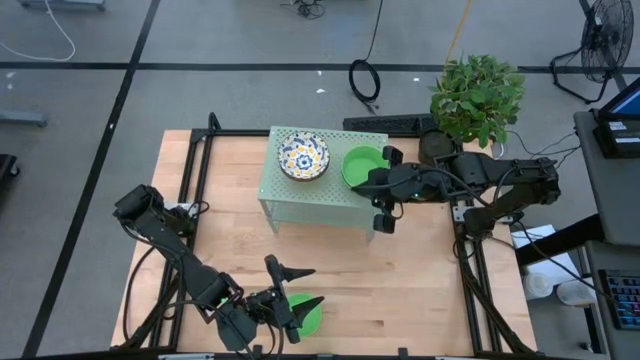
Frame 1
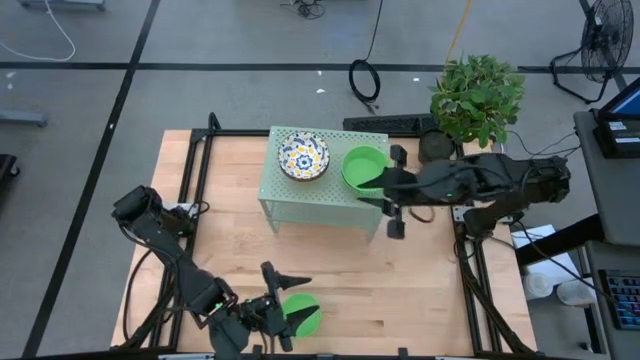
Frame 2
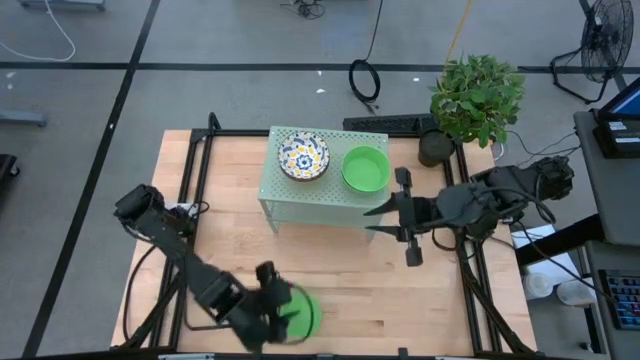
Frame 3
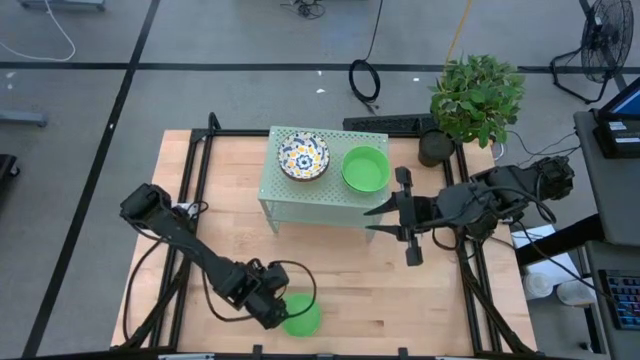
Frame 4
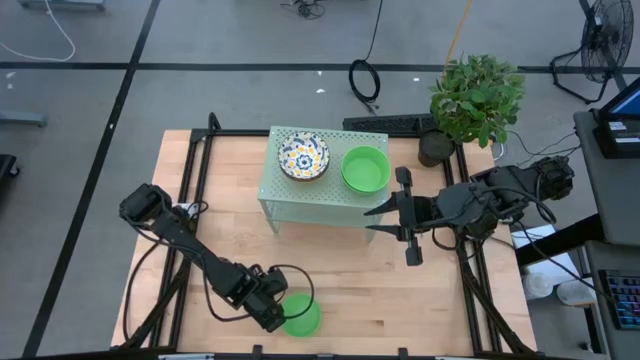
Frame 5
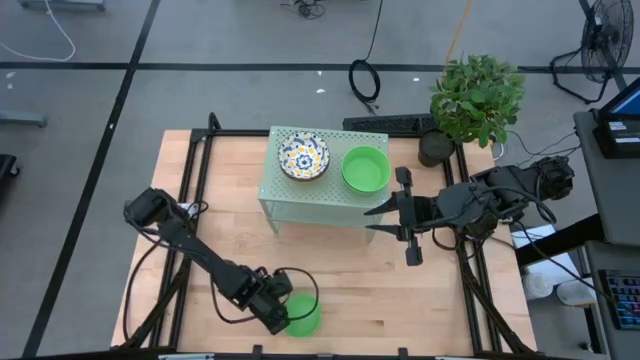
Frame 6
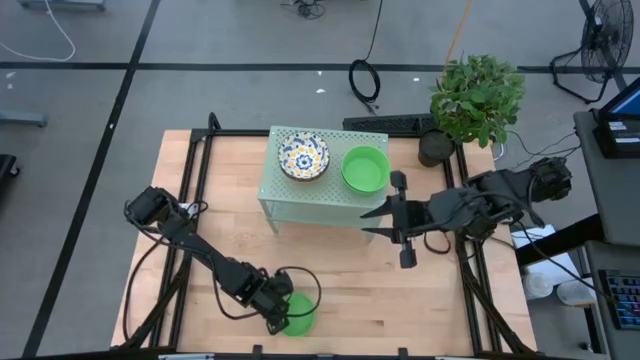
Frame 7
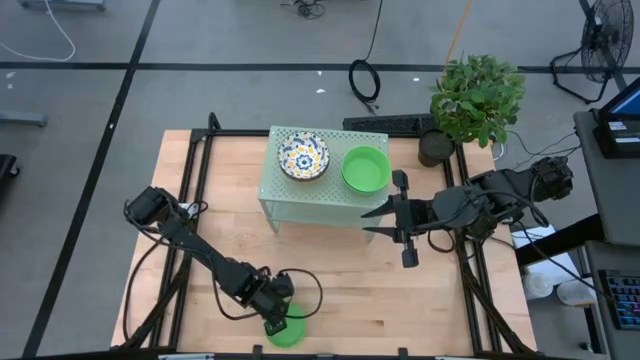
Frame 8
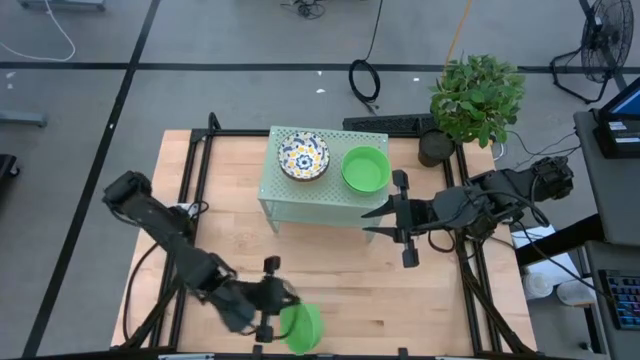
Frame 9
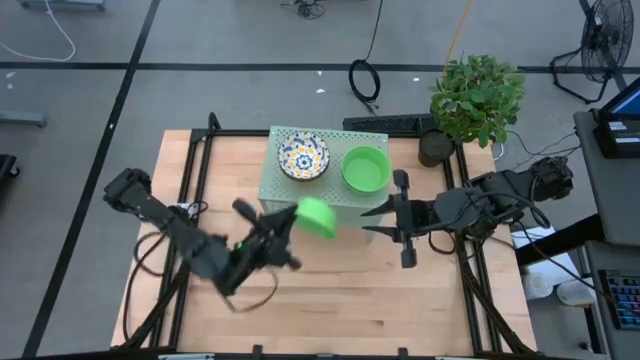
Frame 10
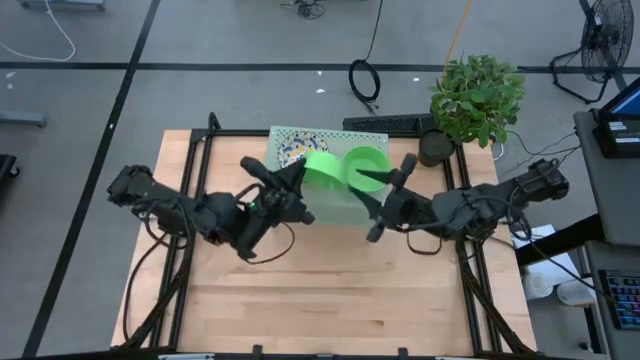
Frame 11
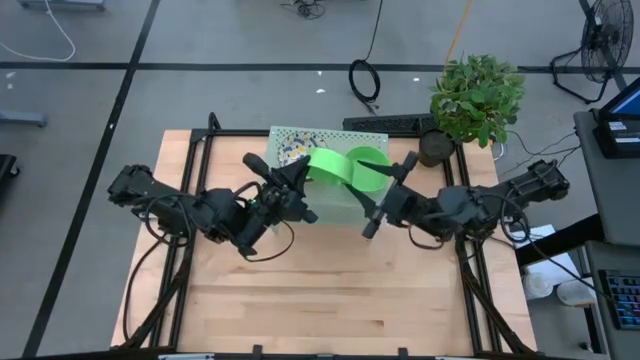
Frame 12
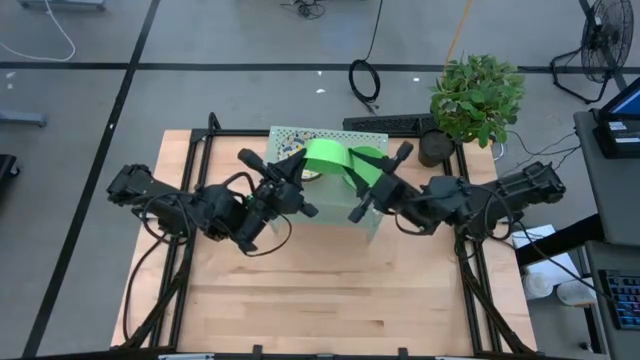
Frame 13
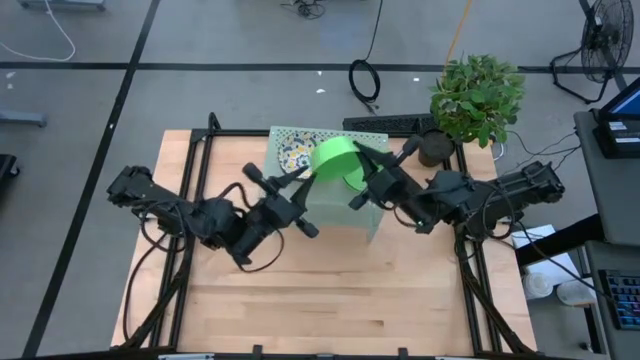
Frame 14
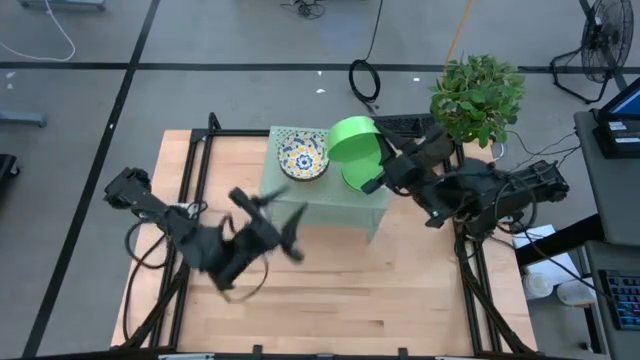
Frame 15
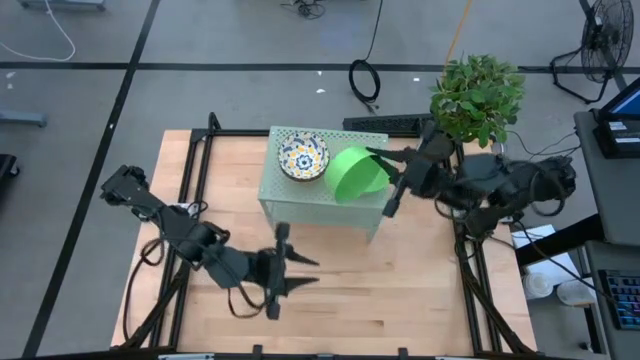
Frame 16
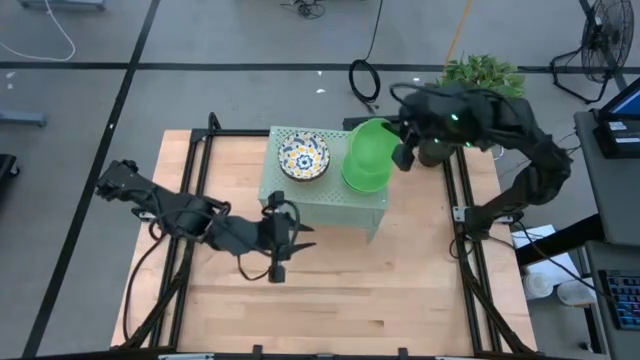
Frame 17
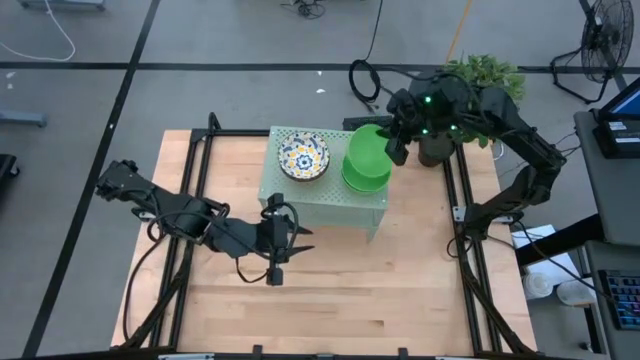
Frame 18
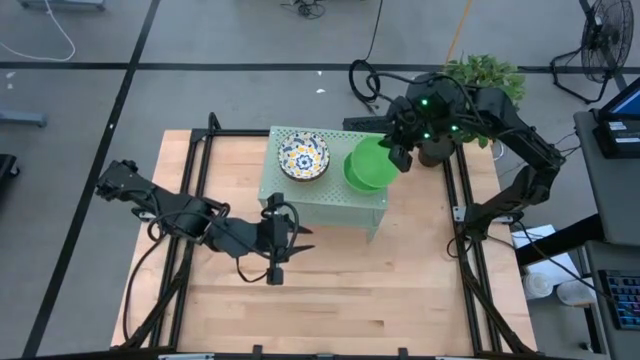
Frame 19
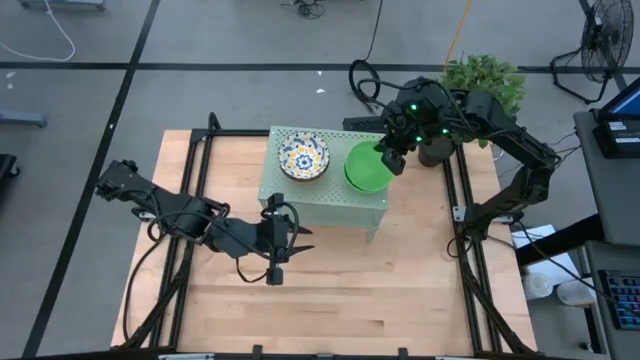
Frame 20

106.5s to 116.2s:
Task: Pick & Place Mini bowls
Stack the green bowl on the green bowl on the shelf

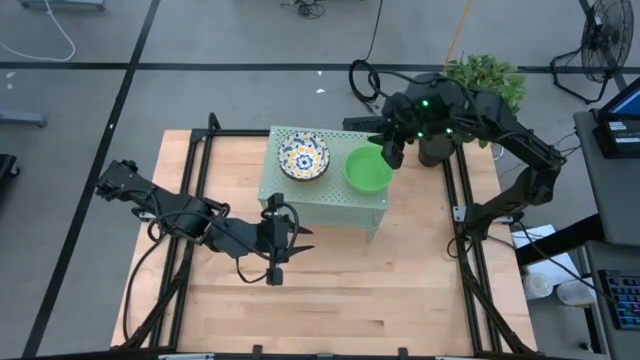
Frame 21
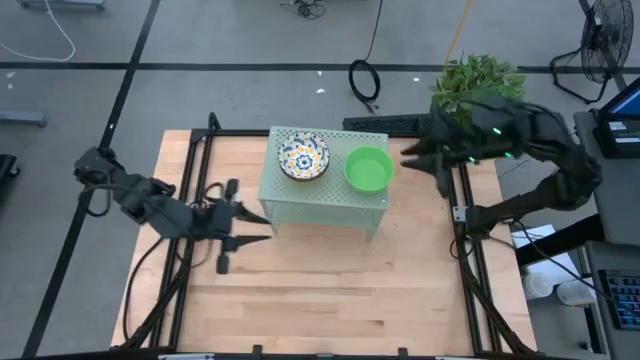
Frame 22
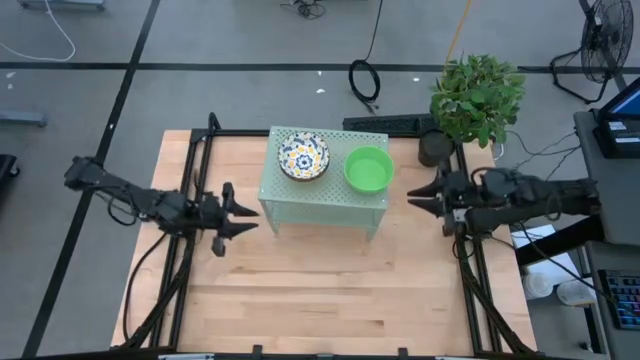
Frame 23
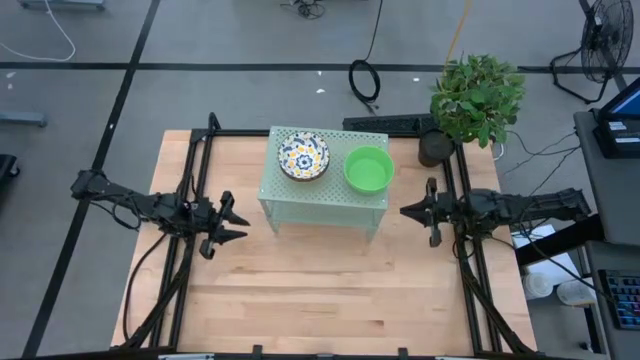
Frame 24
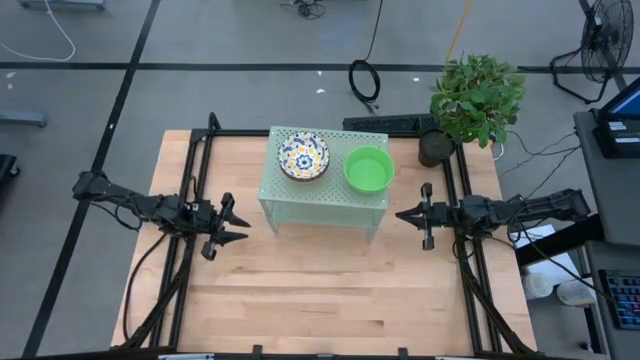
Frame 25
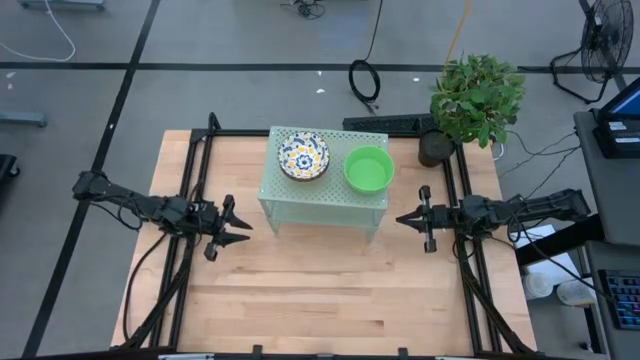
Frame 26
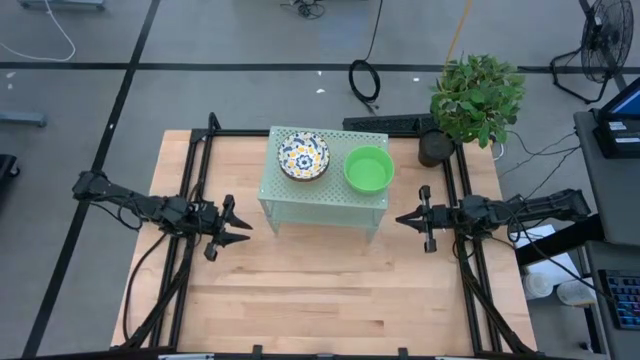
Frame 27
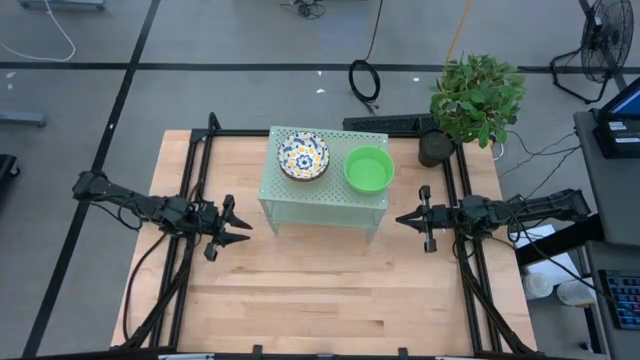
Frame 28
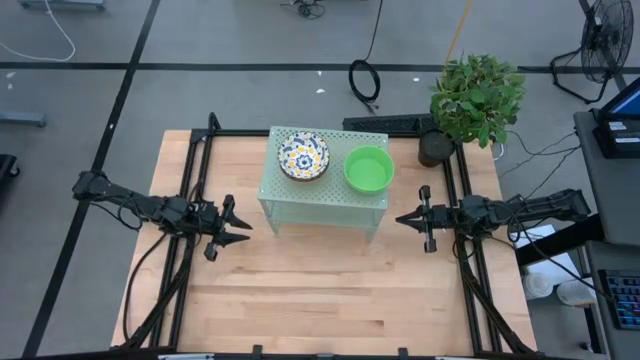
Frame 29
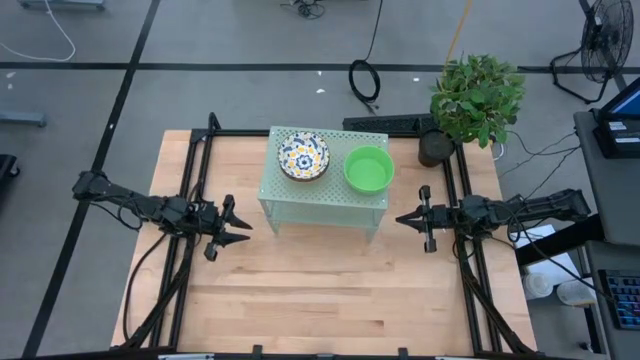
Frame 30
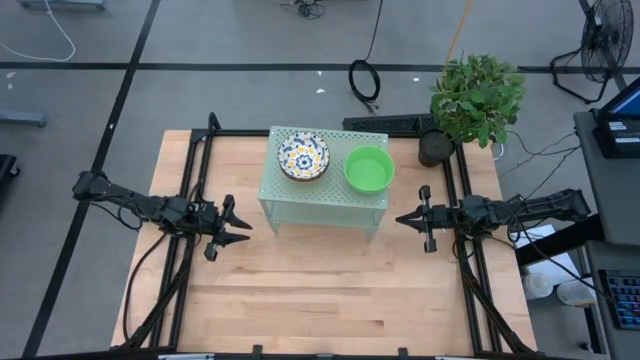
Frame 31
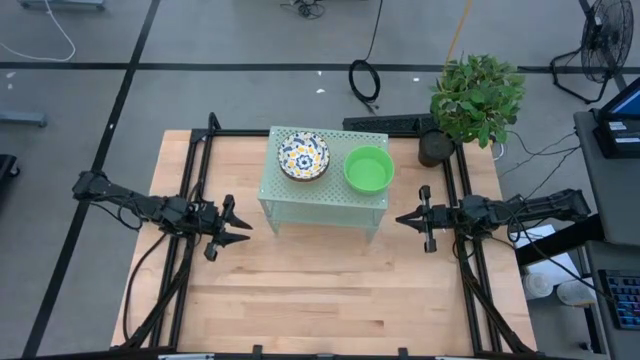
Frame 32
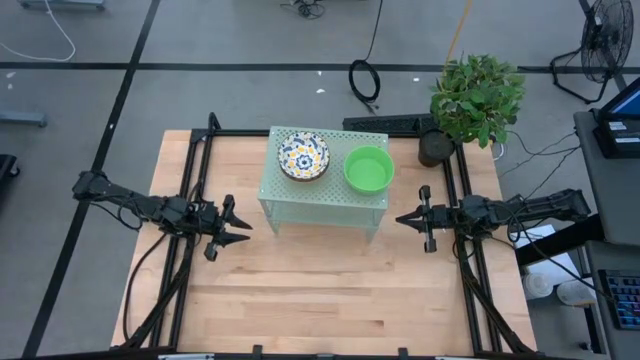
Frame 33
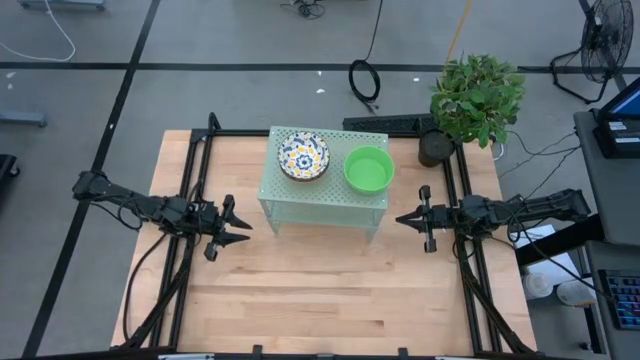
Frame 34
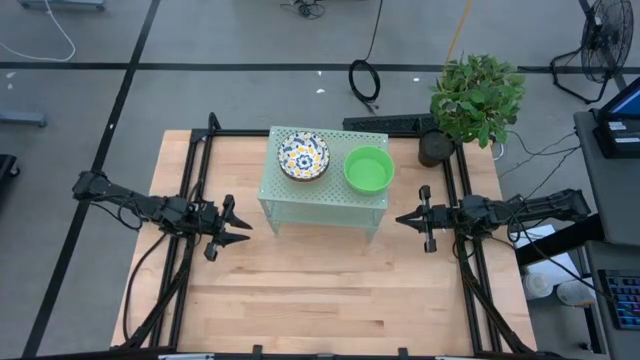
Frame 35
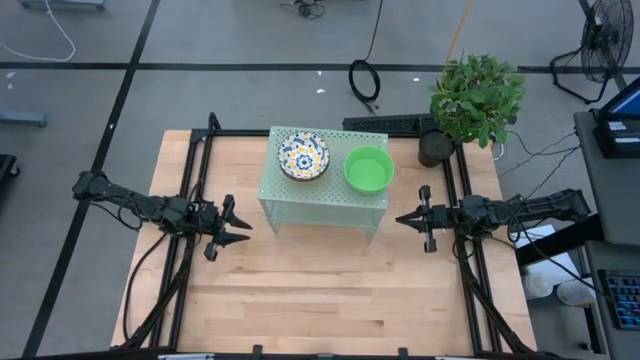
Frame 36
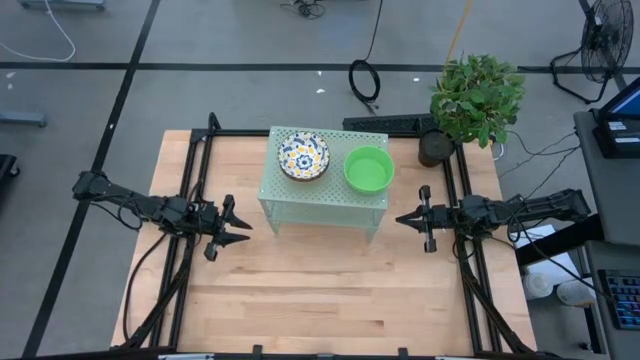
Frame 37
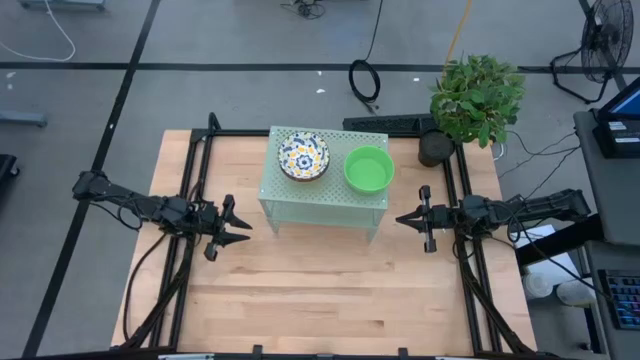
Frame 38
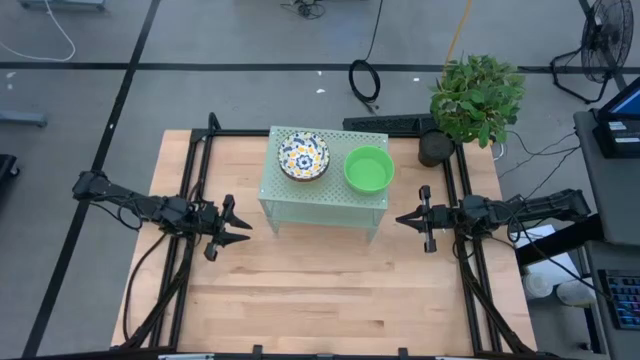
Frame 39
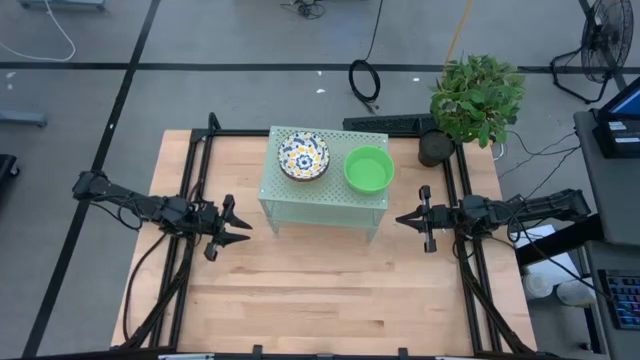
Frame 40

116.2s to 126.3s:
Return to Home Position

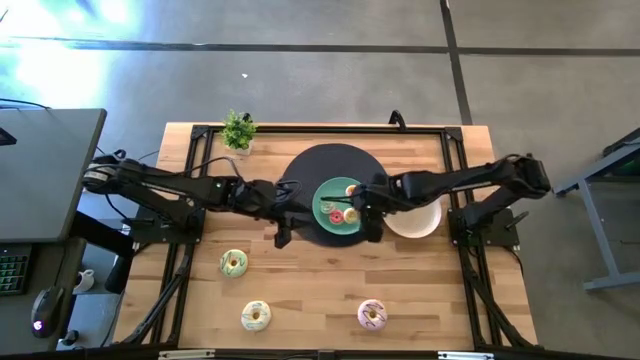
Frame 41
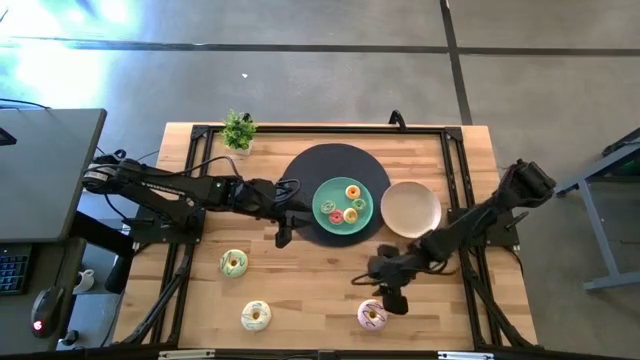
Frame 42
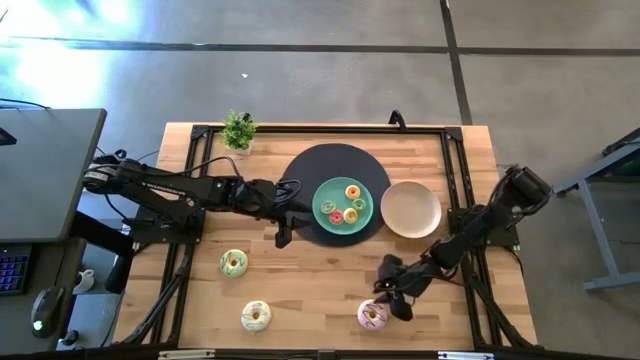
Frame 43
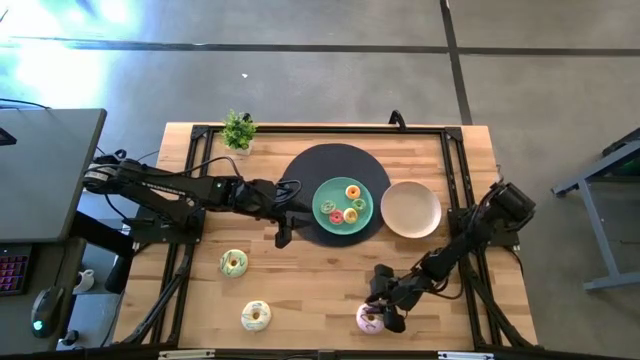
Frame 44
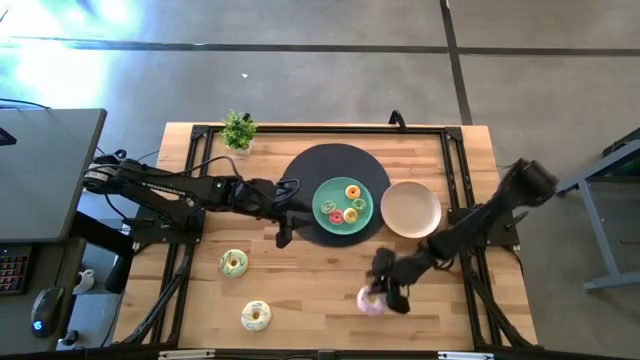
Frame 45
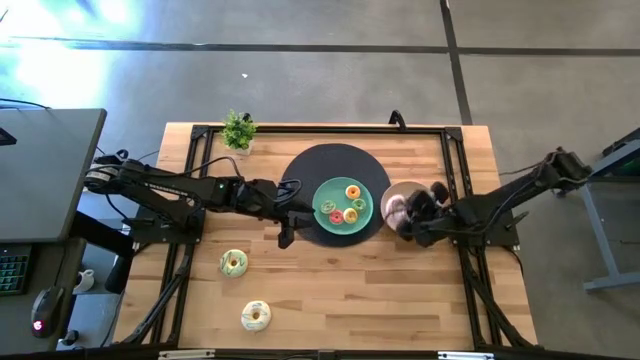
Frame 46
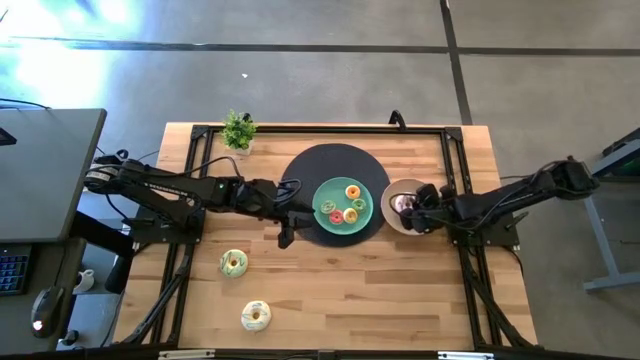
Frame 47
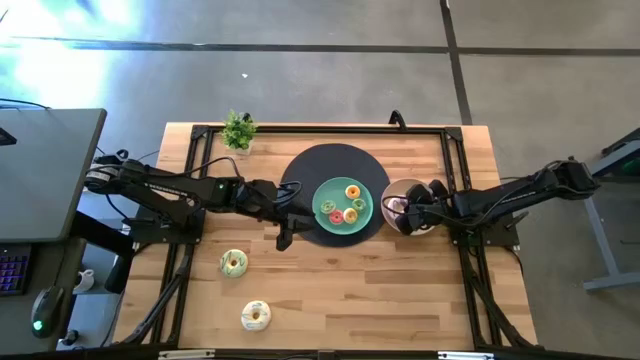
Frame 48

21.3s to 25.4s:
Task: Pick & Place donuts
Put the big purple donut into the light brown plate
